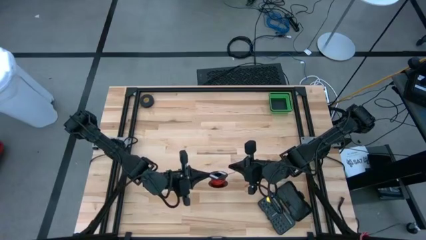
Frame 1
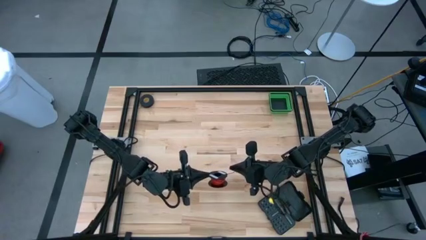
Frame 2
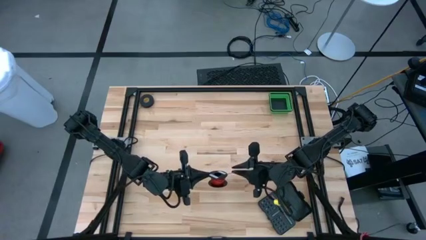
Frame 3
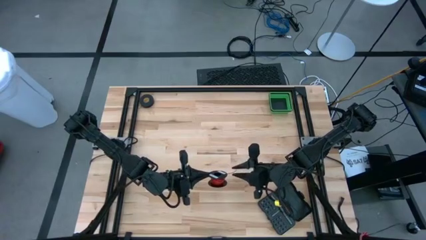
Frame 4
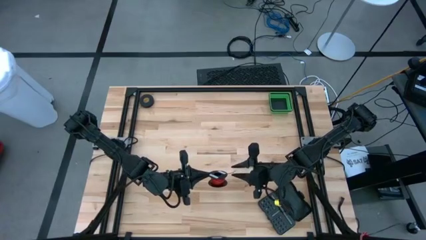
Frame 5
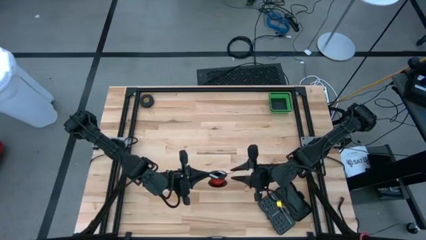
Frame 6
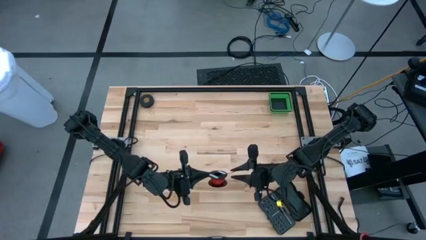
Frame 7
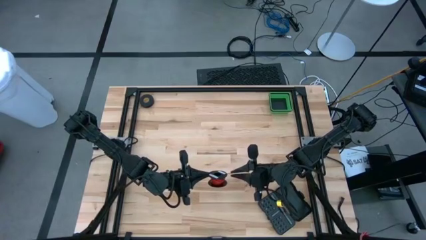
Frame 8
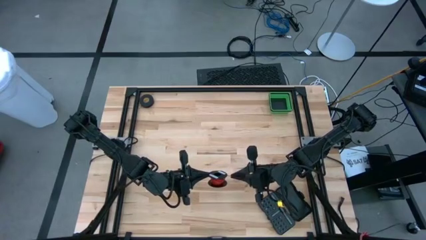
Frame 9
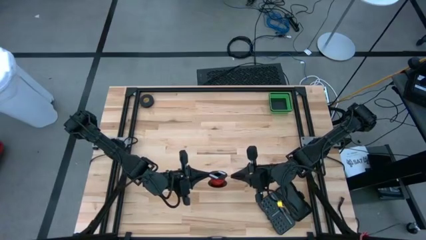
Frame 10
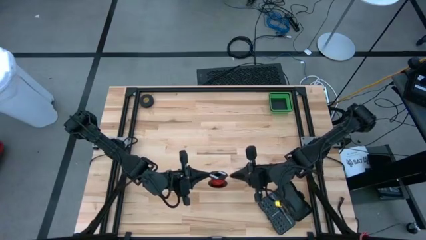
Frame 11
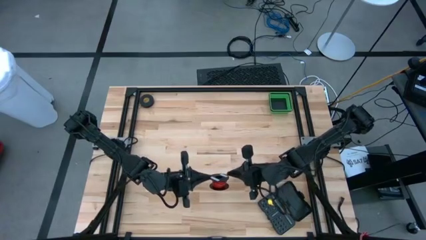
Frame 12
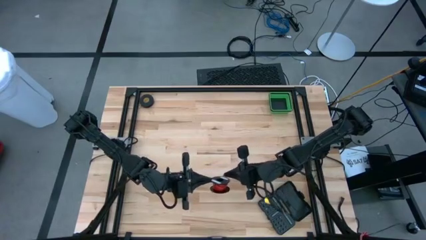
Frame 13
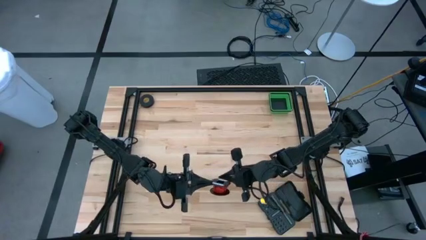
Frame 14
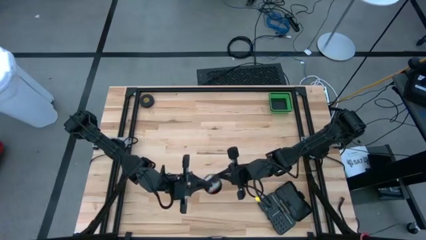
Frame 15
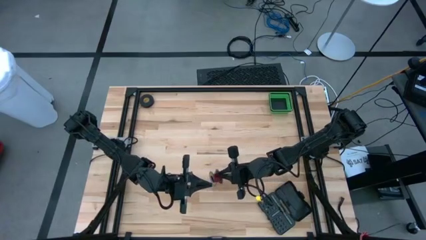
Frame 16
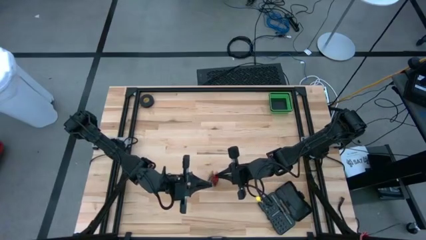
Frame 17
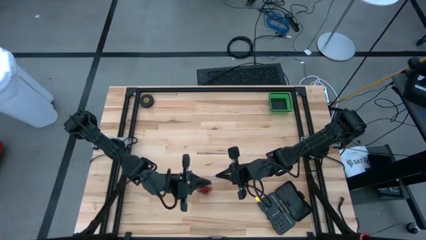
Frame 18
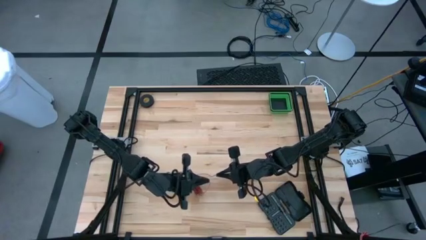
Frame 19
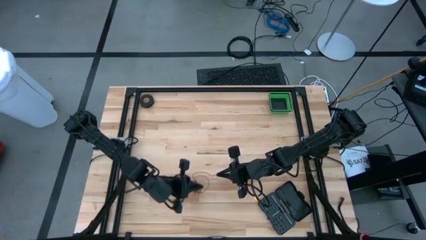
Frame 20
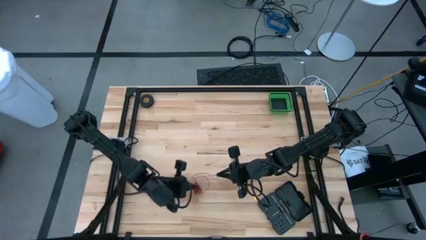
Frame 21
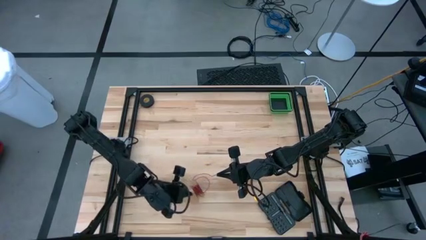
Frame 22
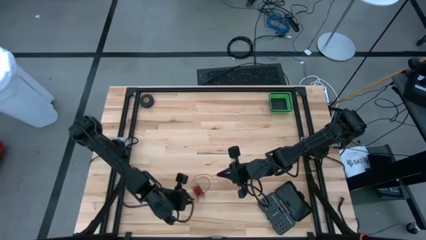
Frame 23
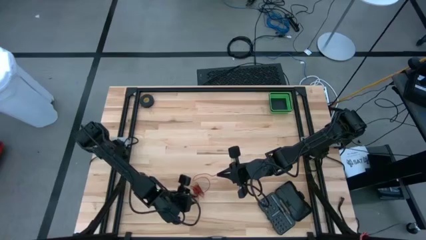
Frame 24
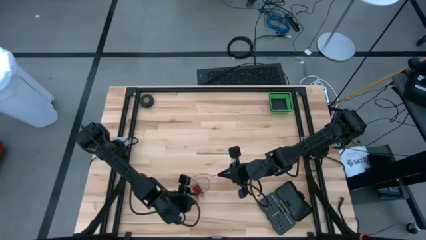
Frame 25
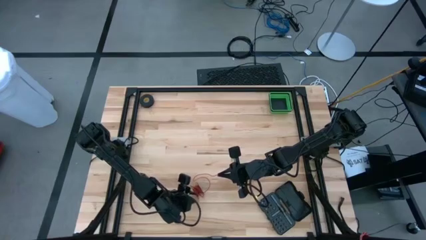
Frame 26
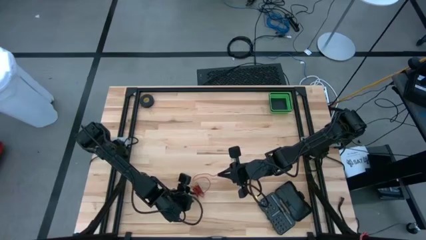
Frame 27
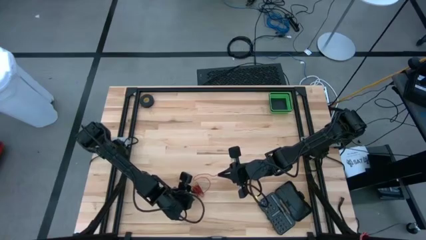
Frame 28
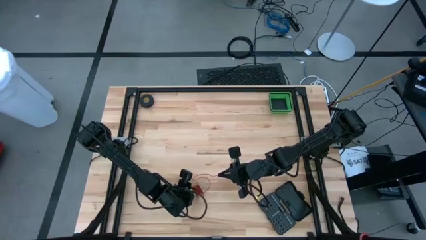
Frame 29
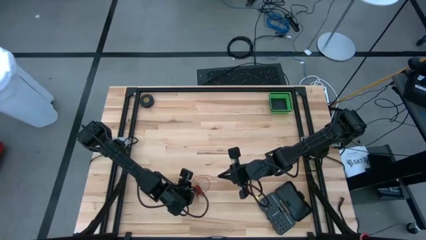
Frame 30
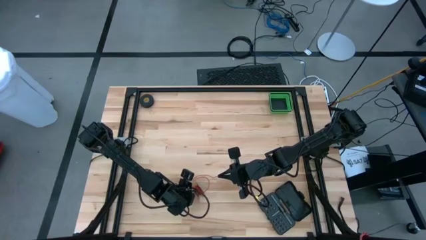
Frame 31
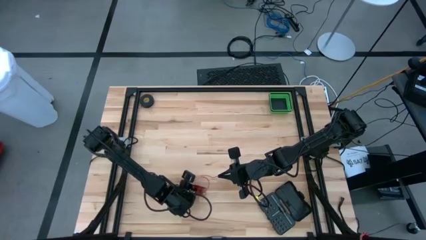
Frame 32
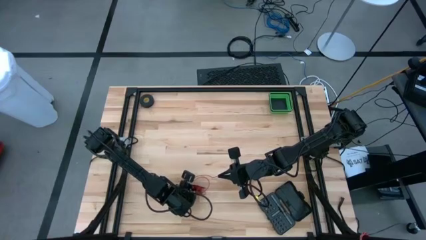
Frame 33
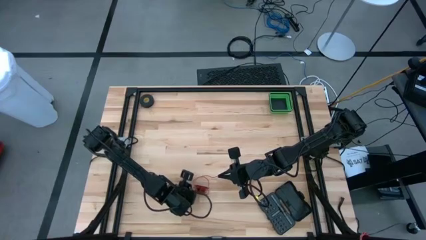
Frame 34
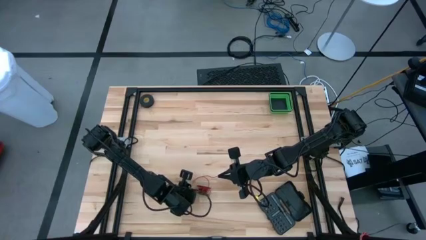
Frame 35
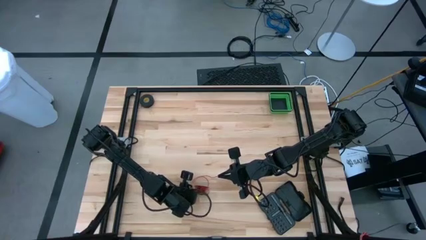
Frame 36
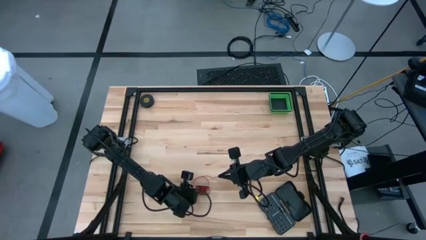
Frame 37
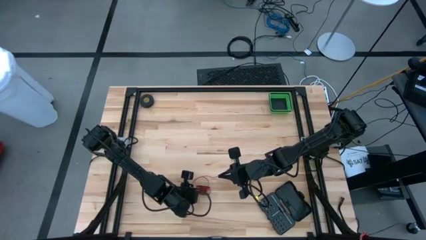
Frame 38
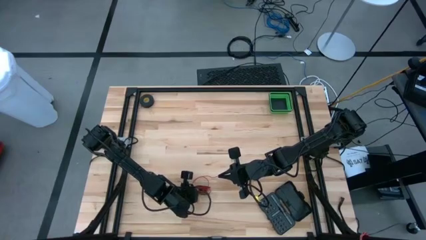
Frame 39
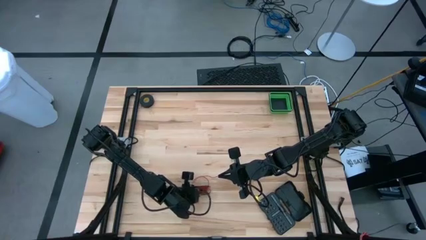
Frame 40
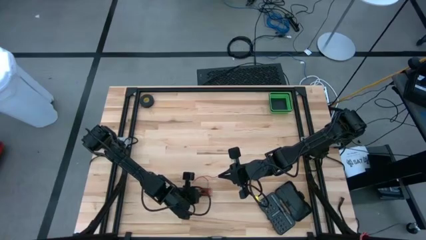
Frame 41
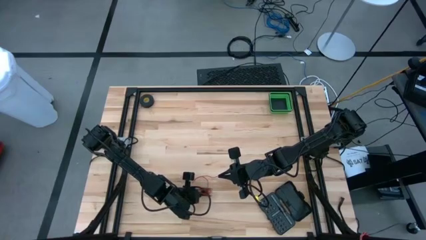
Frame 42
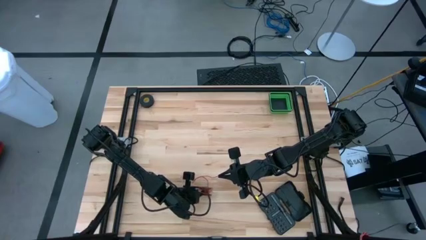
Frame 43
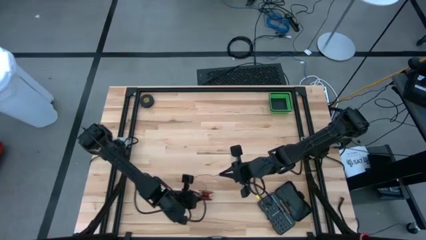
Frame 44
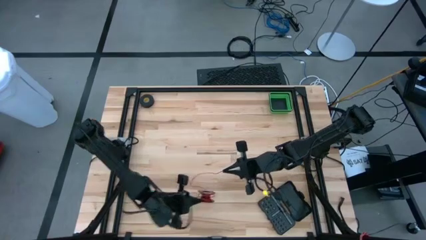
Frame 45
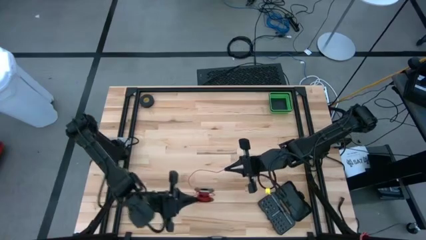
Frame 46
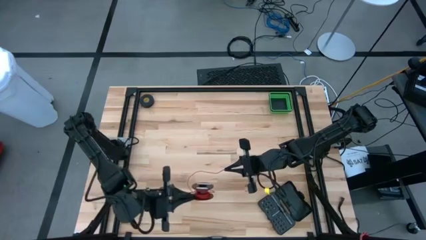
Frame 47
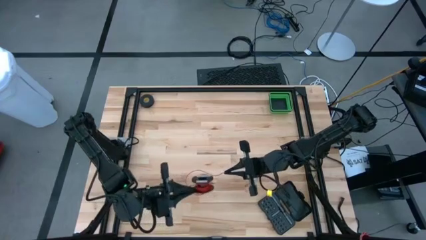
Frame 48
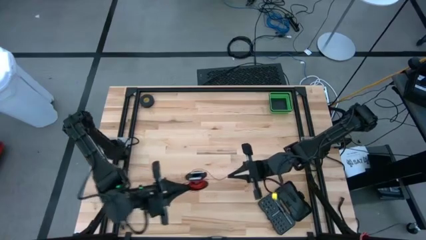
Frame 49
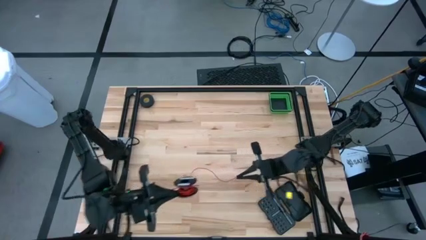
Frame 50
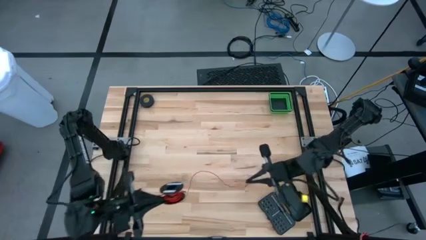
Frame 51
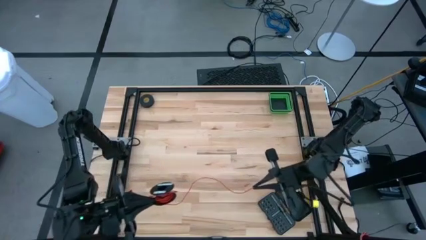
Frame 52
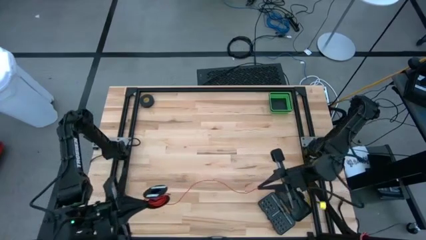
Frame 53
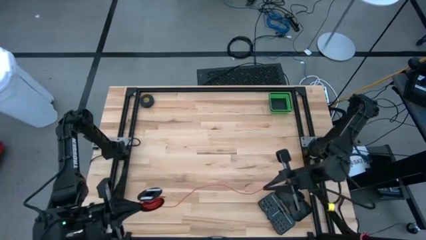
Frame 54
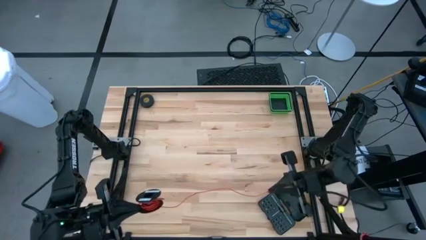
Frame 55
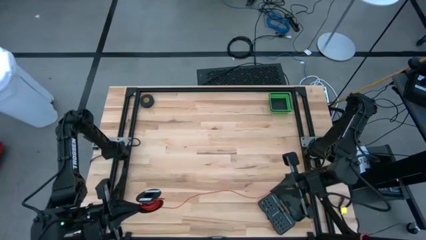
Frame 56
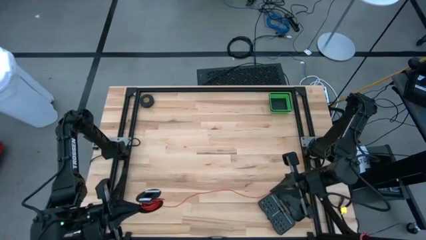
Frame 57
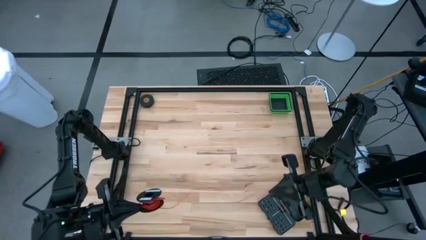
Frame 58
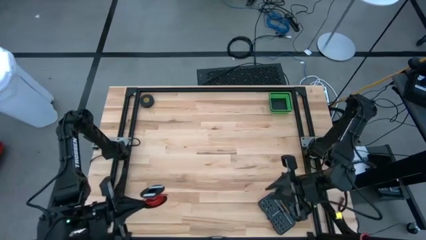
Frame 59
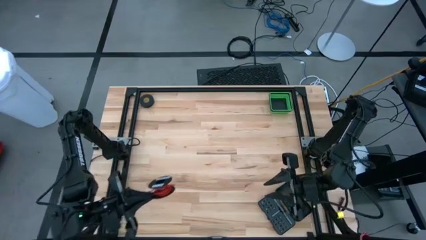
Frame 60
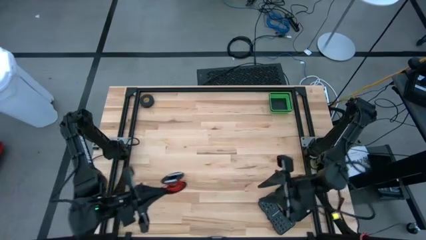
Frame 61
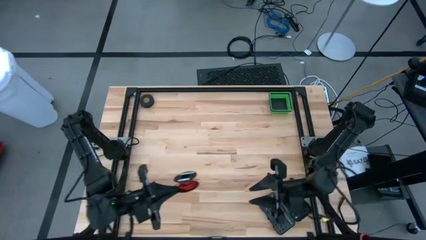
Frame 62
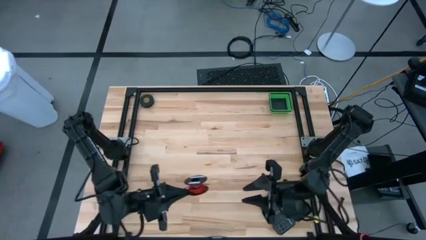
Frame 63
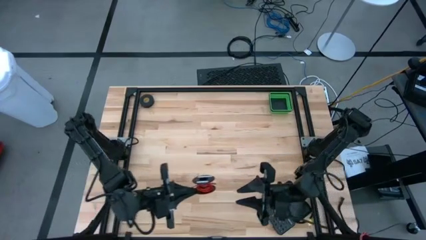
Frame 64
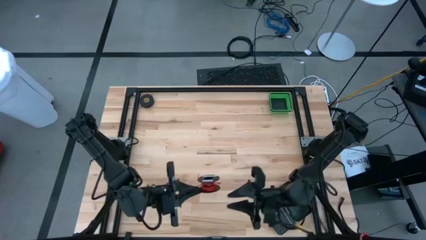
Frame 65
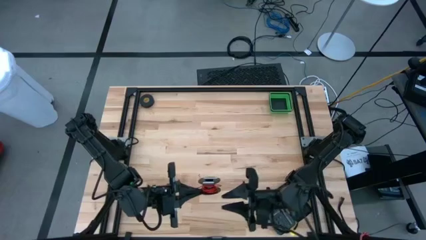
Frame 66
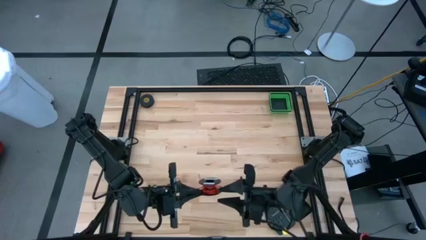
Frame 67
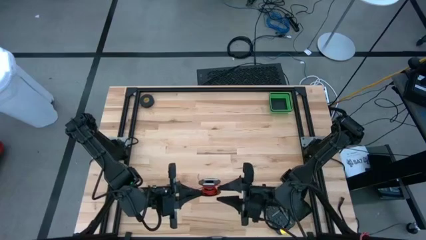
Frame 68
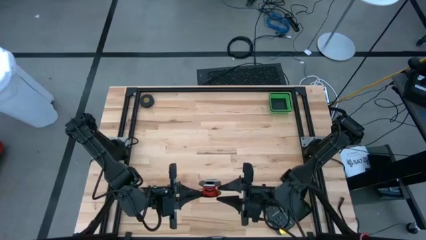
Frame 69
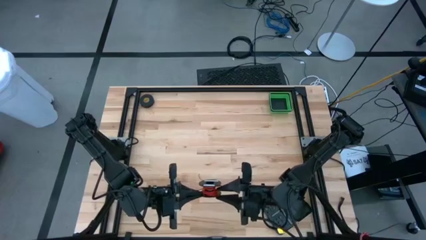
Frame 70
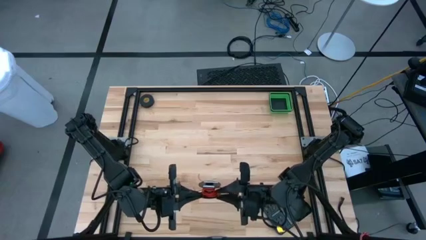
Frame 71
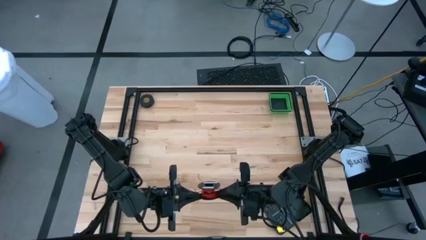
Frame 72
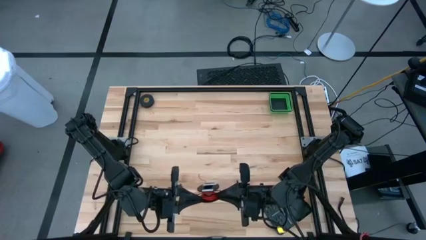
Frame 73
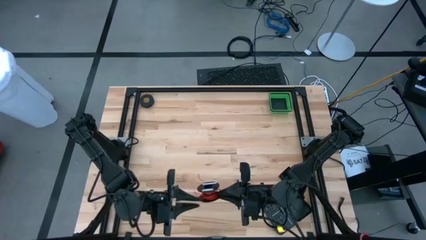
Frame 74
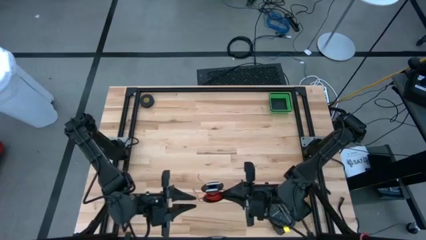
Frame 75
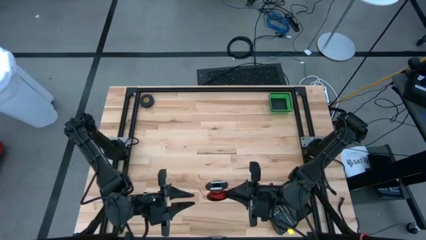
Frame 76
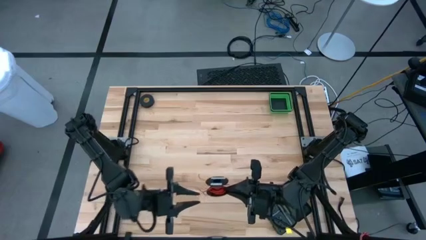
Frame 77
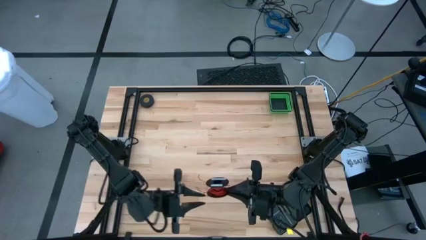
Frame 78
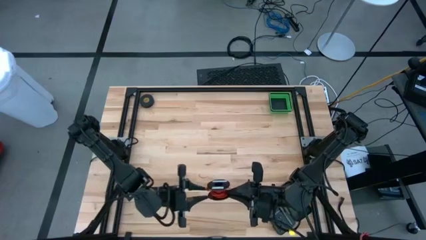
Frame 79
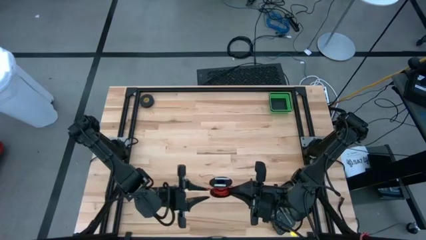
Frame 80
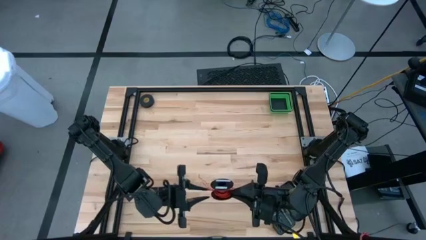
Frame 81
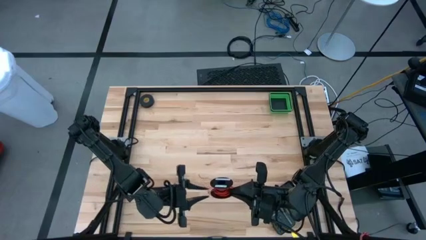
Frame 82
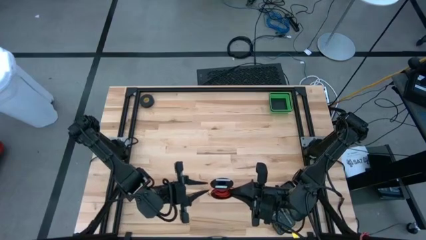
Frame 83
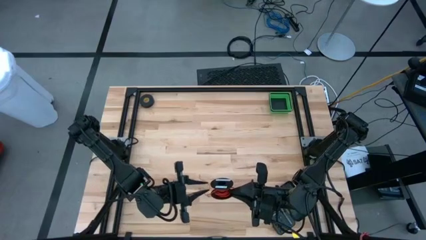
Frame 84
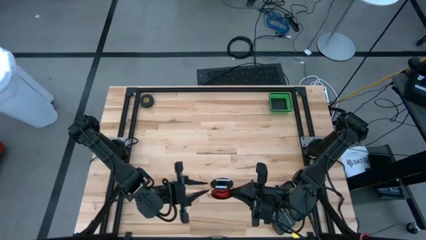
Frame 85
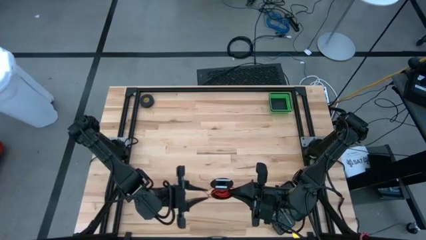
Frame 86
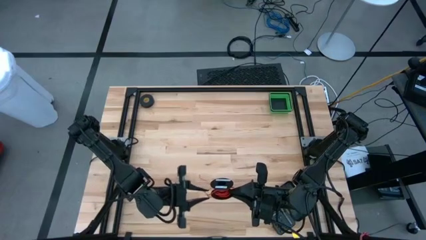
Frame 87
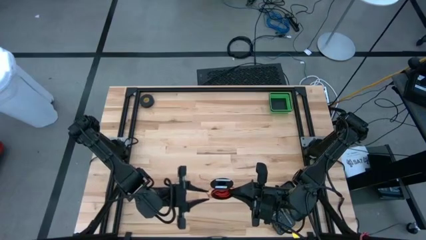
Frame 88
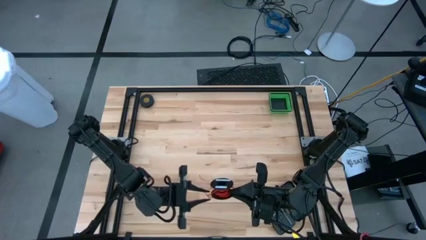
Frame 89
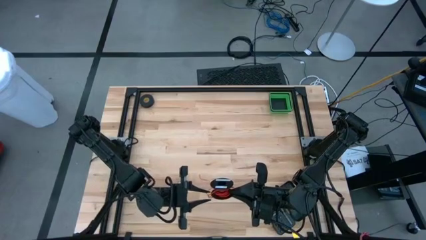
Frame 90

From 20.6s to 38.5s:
Task: Coil cords
Uncoil the red wire on the black spool
